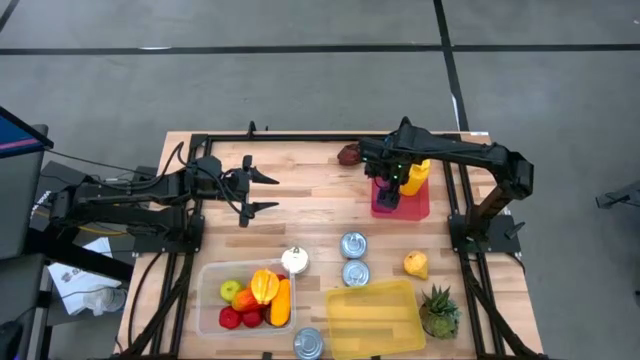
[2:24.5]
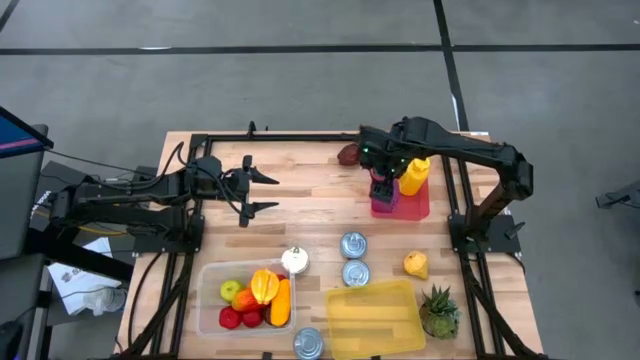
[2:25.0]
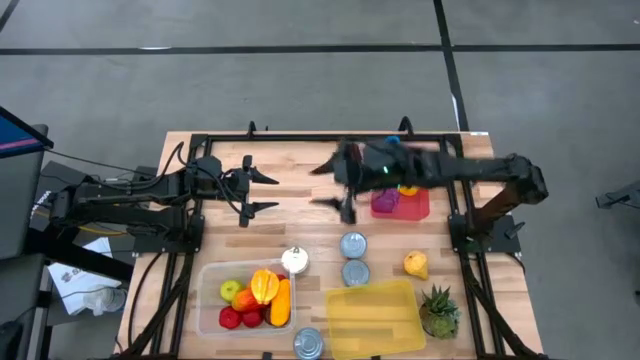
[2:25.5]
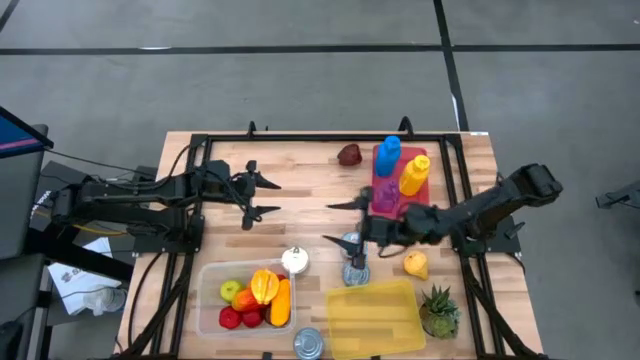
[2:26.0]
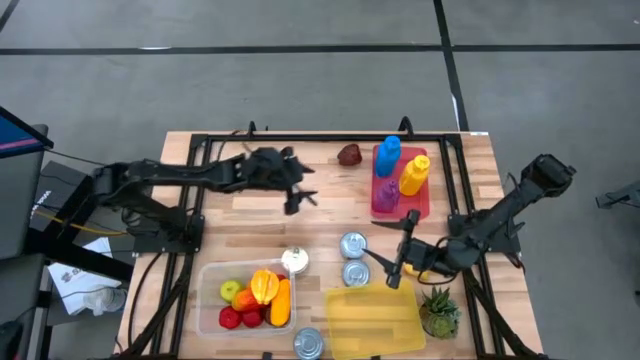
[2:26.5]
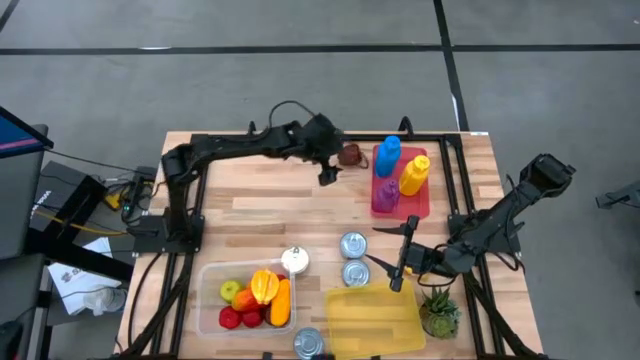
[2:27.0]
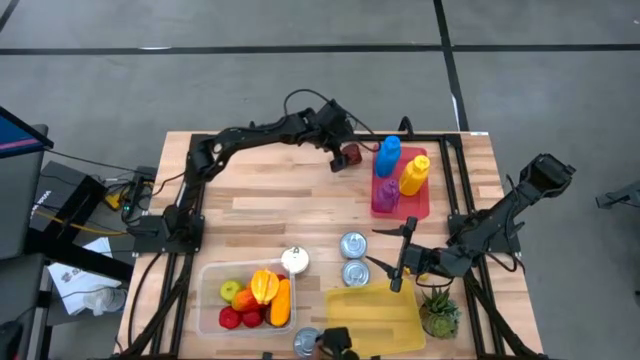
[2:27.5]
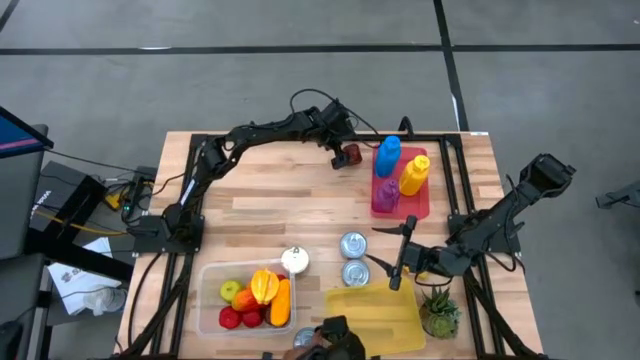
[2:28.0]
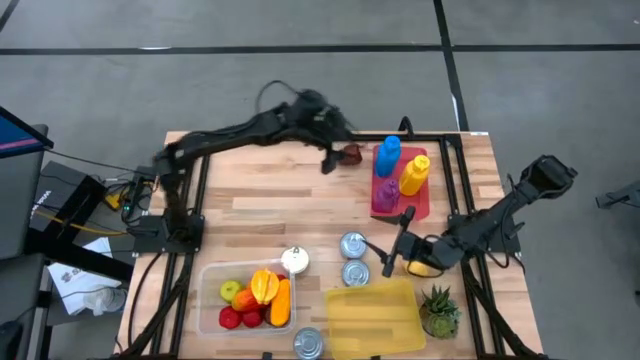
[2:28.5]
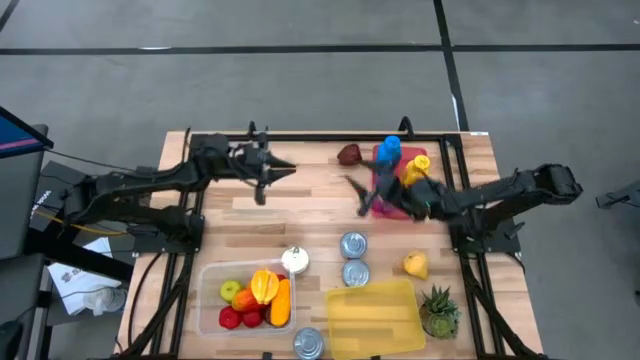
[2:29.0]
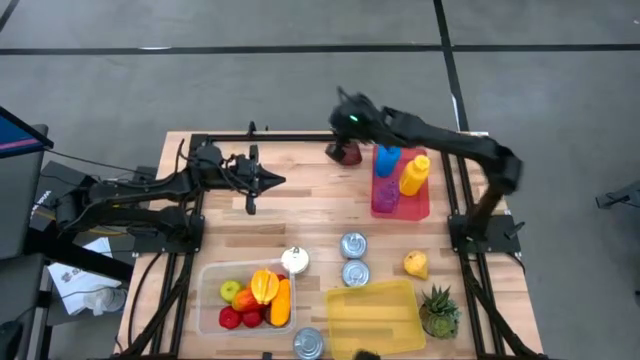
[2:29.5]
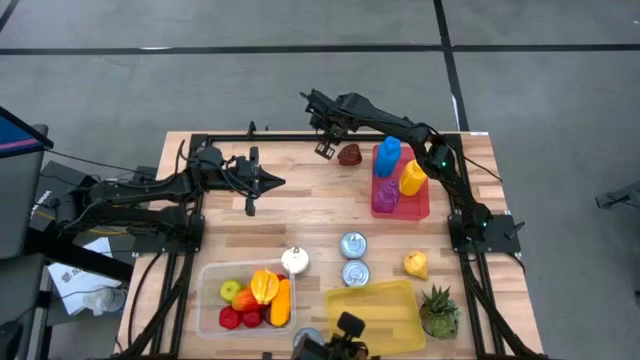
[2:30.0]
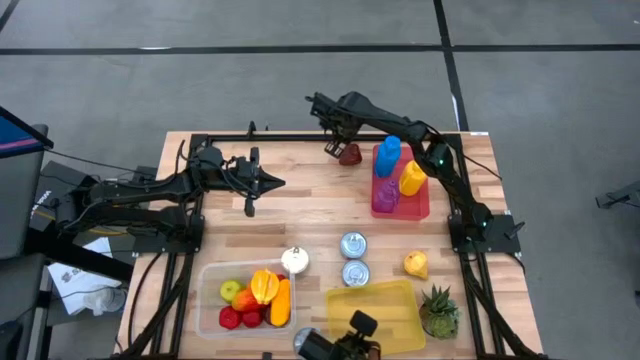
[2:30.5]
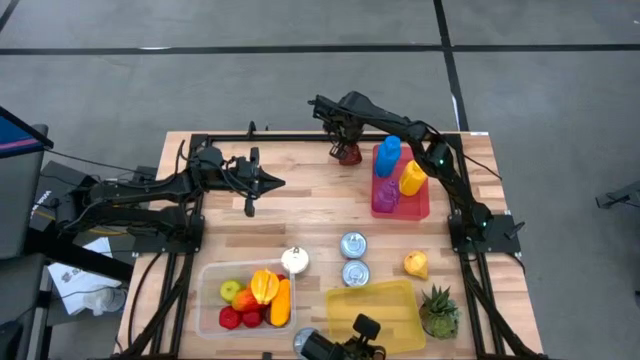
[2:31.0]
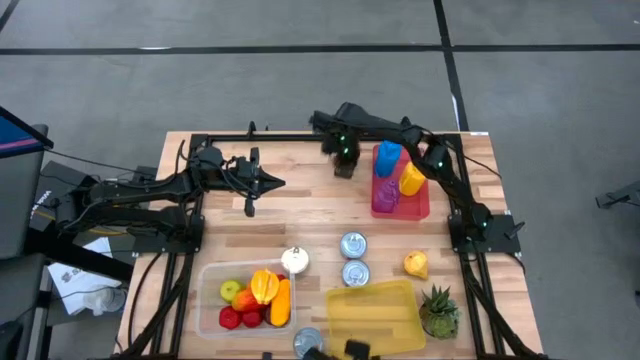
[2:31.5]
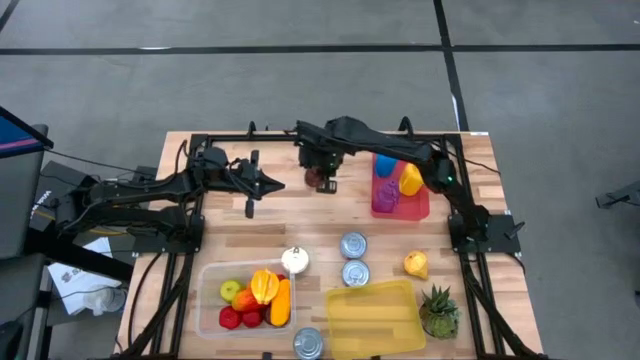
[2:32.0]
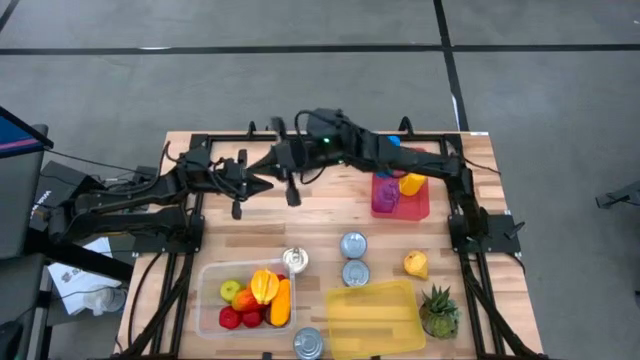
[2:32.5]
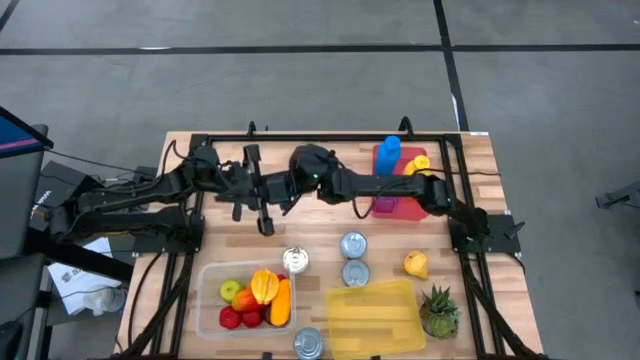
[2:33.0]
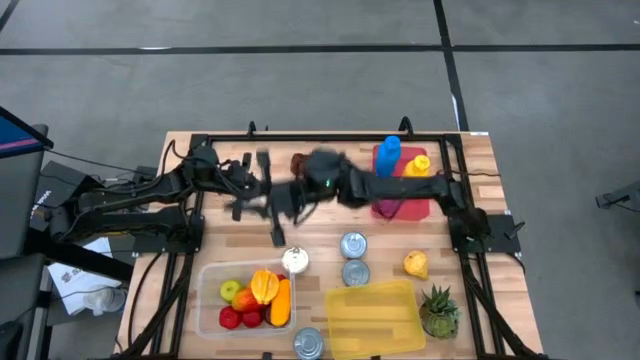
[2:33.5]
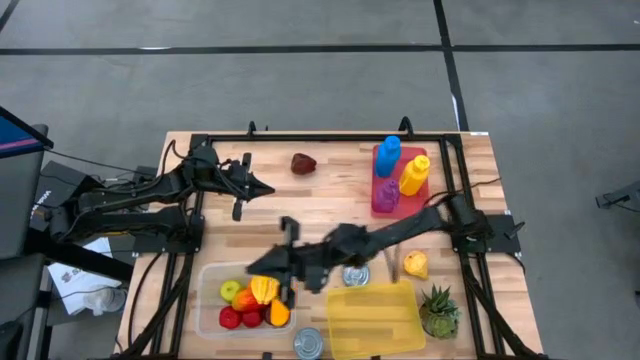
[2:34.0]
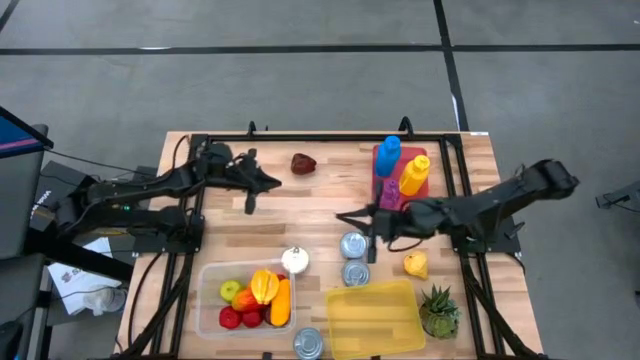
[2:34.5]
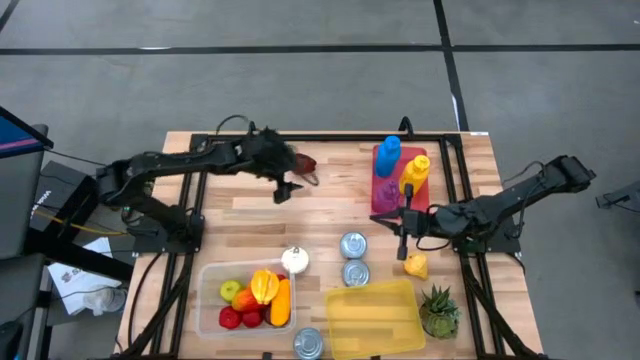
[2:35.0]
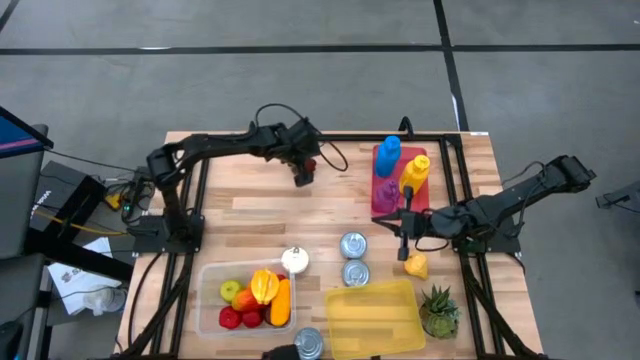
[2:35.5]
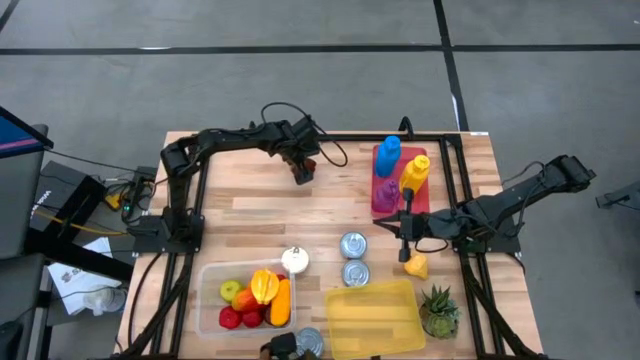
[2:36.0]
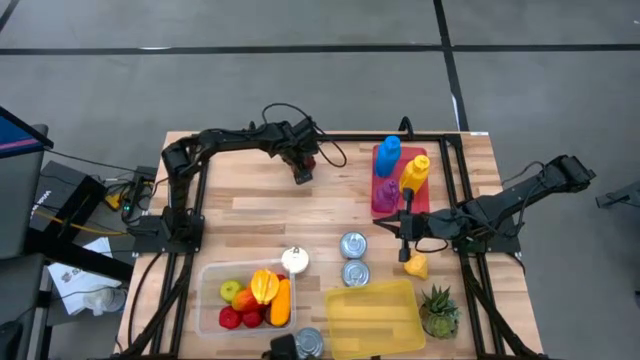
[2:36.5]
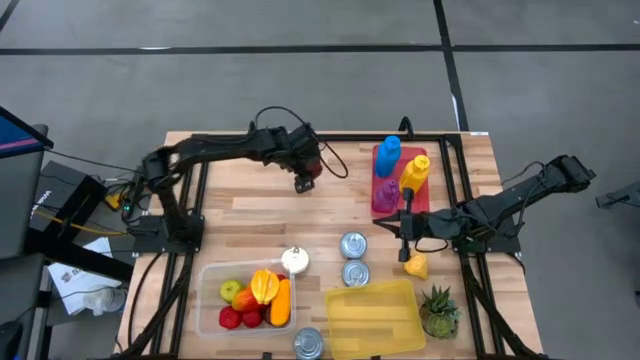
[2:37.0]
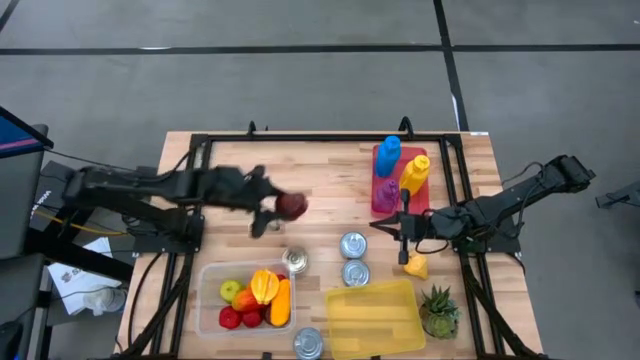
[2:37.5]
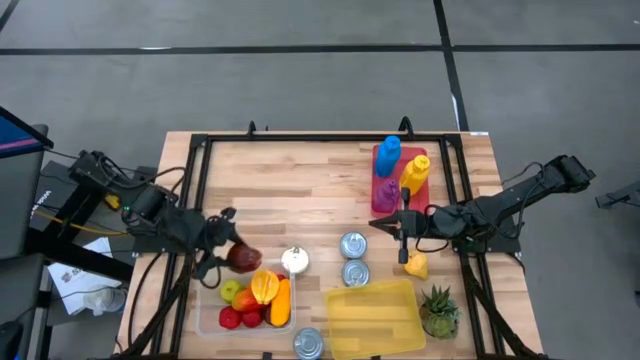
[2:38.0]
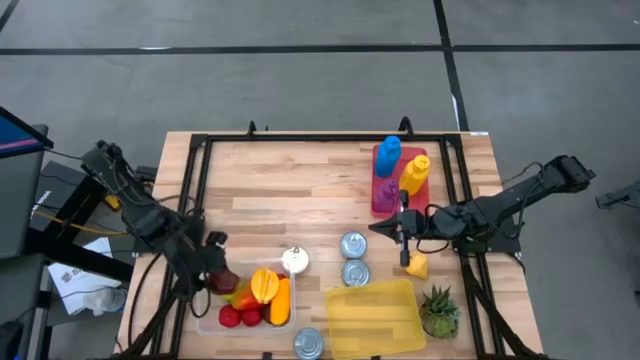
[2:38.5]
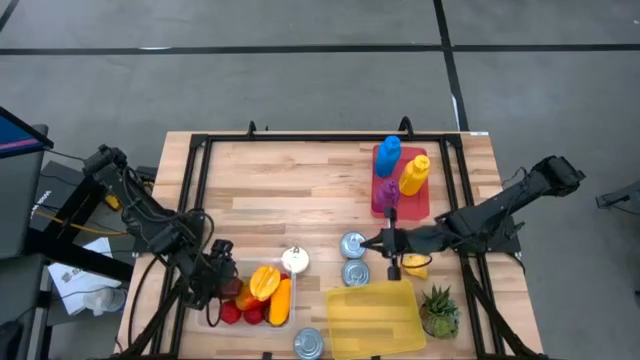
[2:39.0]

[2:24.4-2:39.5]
Task: Pick & Place Food Item
Put the red apple into the transparent bin

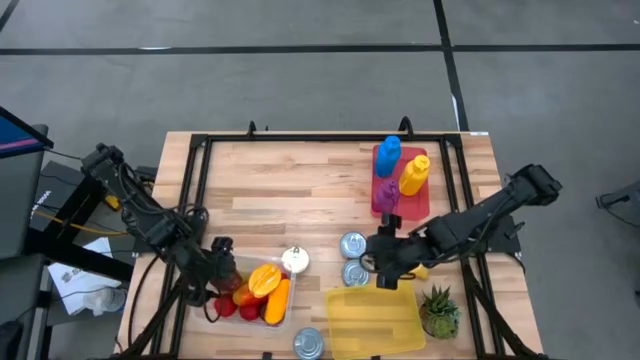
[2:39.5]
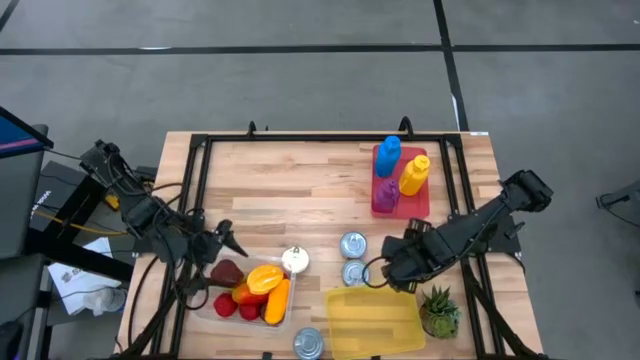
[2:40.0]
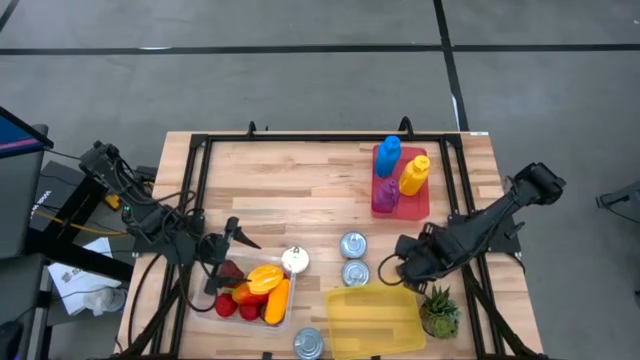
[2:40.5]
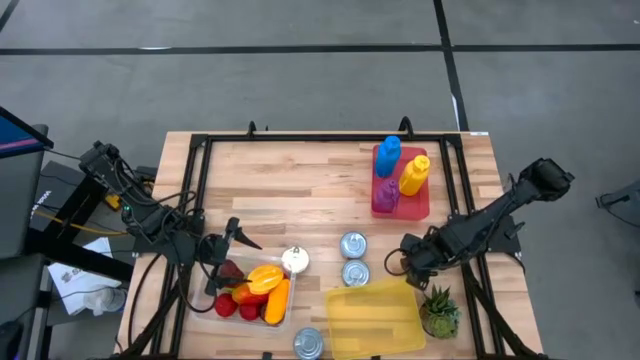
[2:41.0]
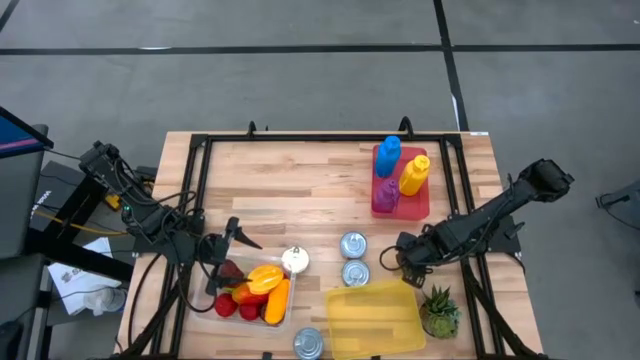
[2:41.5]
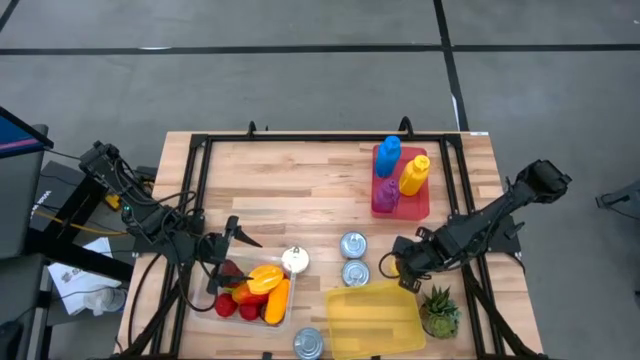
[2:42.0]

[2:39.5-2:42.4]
Put the yellow pear into the transparent bin

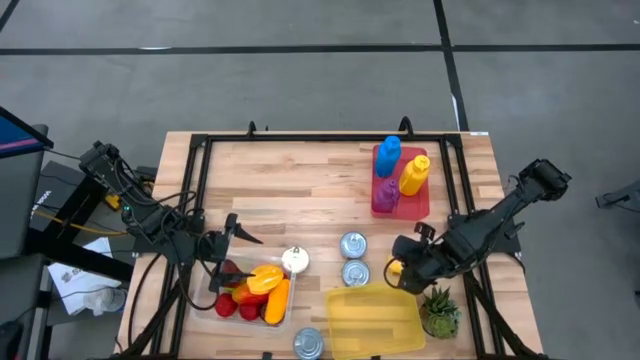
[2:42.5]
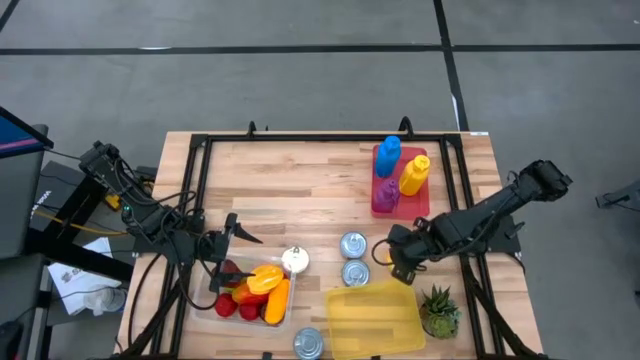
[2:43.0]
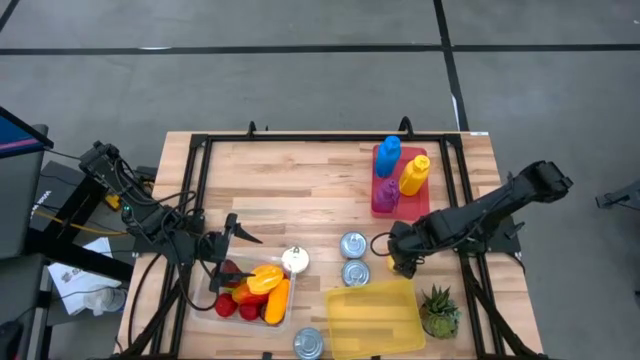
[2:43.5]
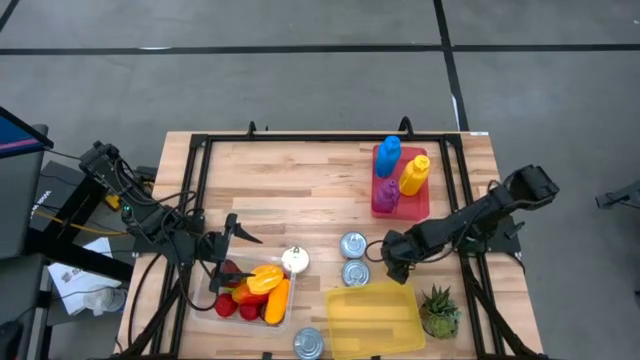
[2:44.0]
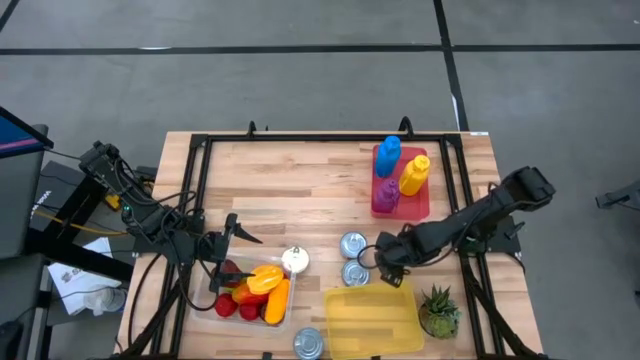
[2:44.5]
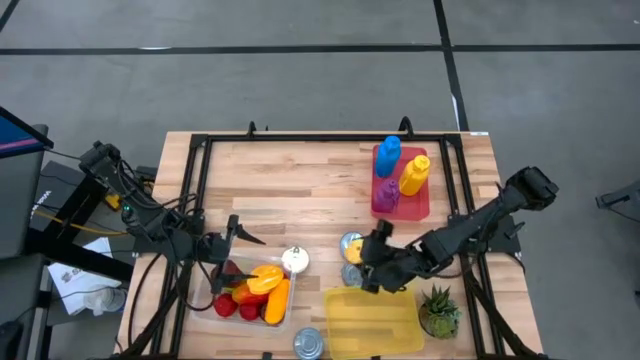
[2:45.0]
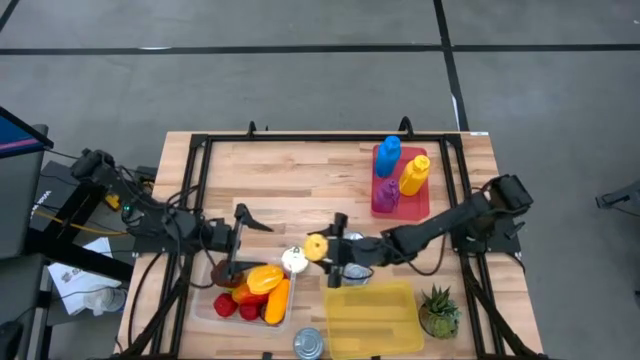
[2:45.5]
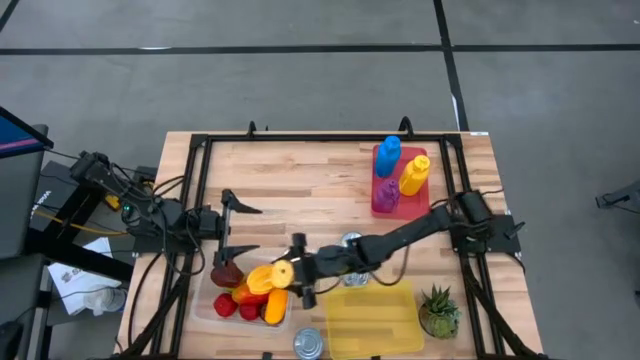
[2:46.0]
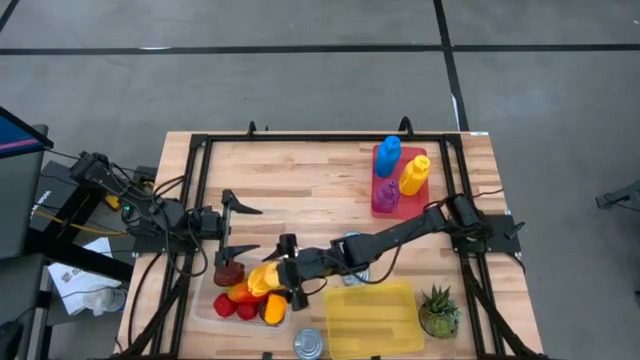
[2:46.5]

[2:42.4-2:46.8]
Put the yellow pear into the transparent bin
